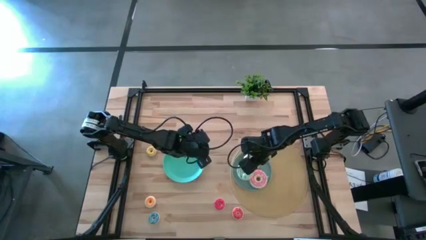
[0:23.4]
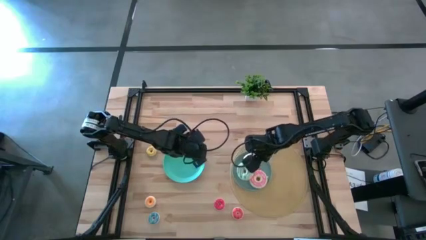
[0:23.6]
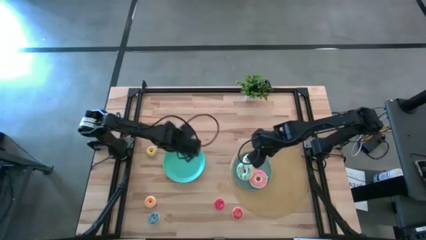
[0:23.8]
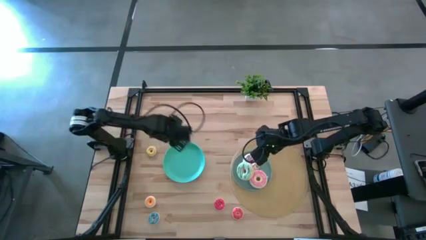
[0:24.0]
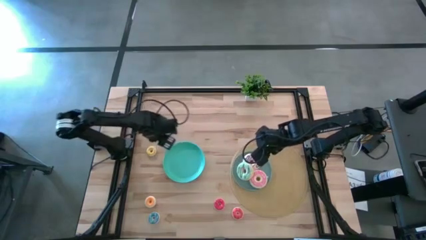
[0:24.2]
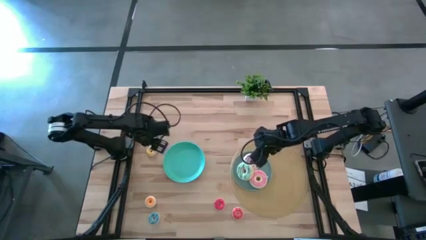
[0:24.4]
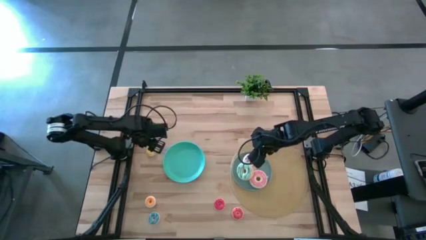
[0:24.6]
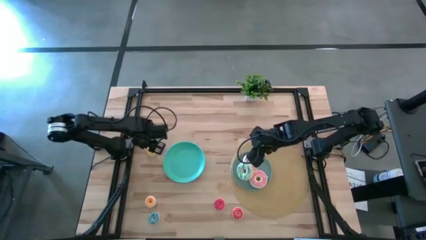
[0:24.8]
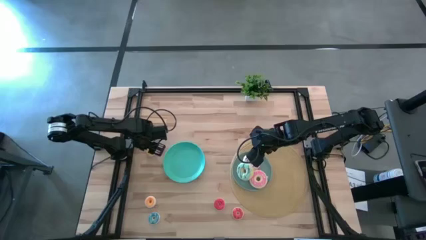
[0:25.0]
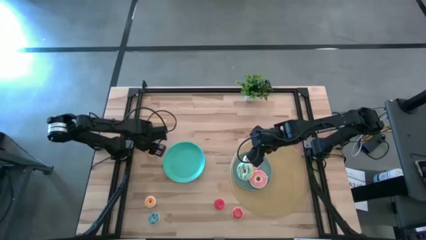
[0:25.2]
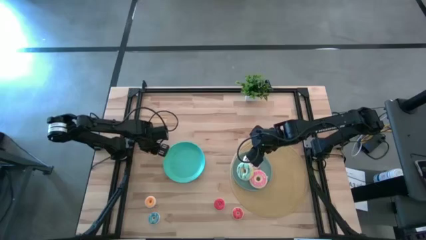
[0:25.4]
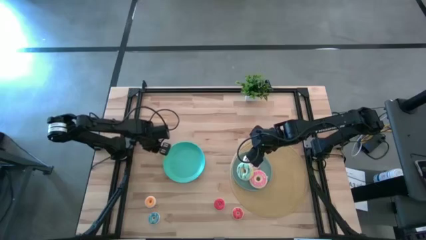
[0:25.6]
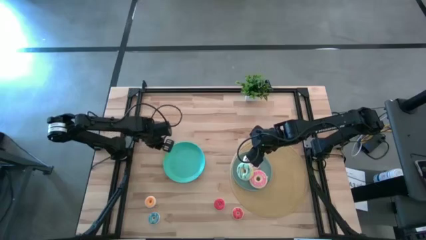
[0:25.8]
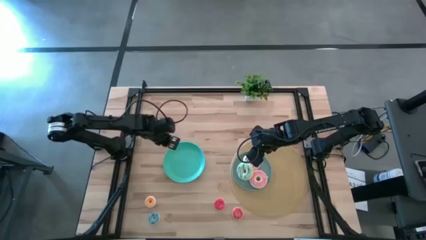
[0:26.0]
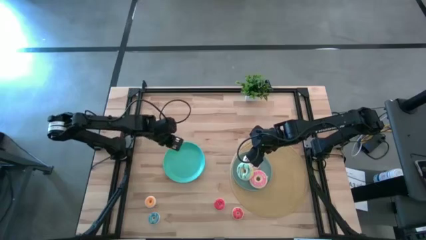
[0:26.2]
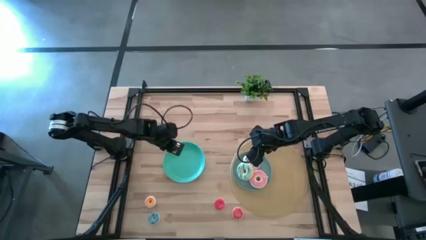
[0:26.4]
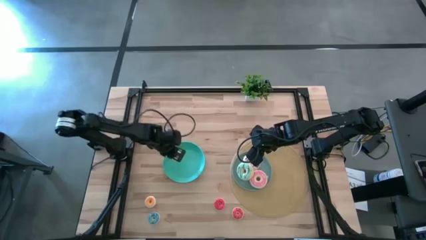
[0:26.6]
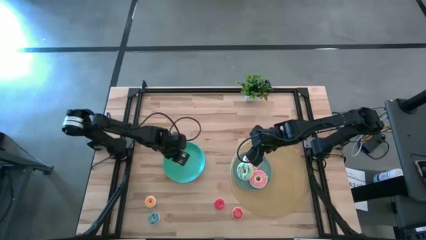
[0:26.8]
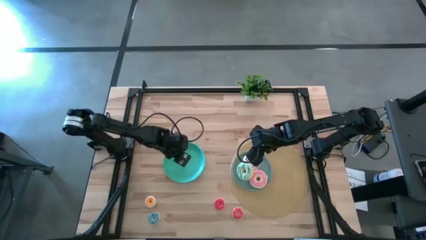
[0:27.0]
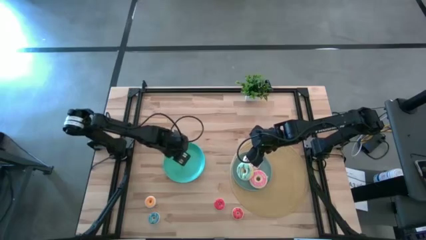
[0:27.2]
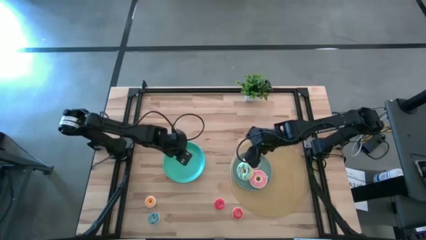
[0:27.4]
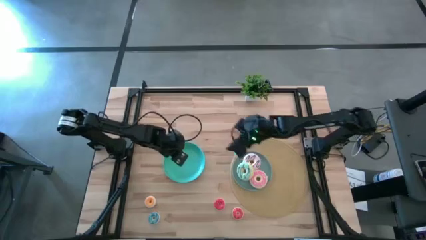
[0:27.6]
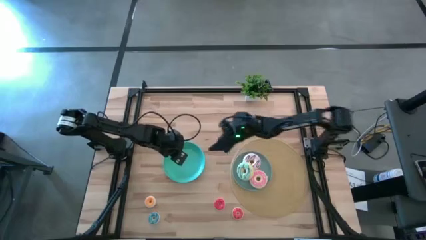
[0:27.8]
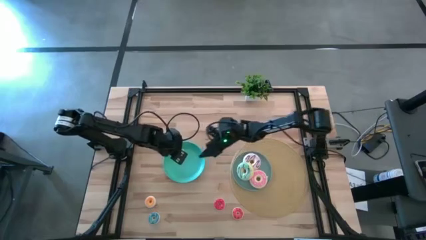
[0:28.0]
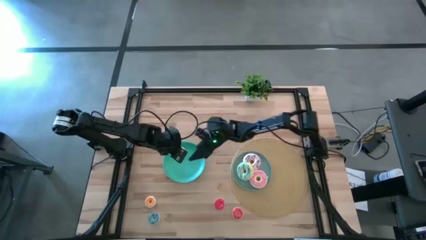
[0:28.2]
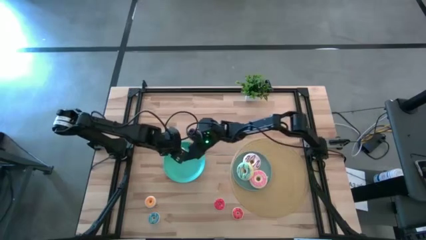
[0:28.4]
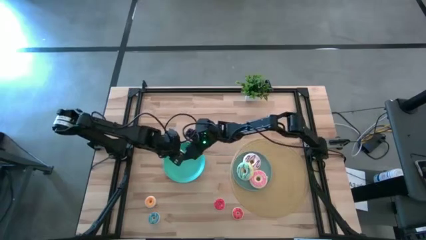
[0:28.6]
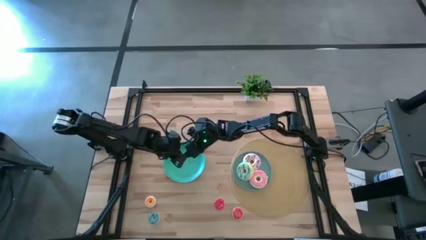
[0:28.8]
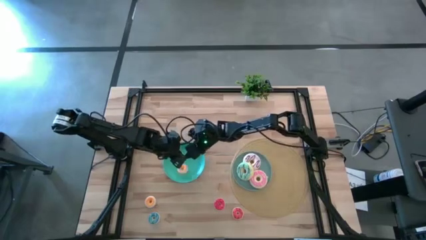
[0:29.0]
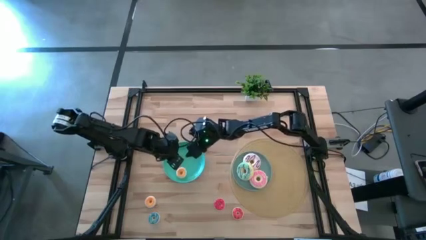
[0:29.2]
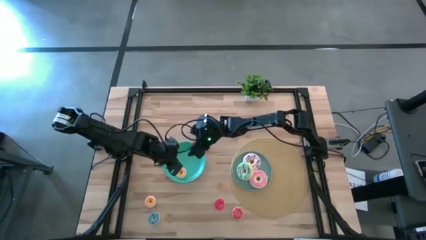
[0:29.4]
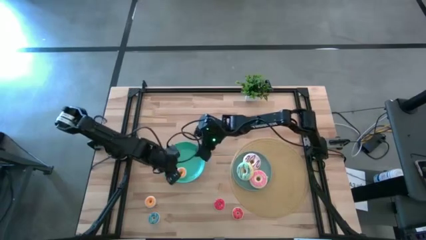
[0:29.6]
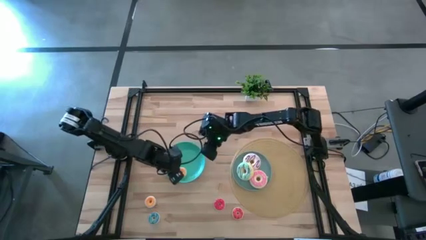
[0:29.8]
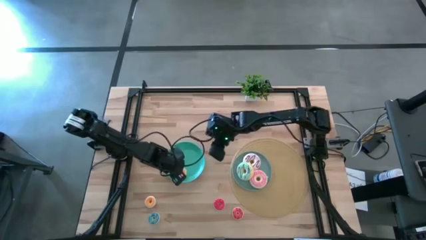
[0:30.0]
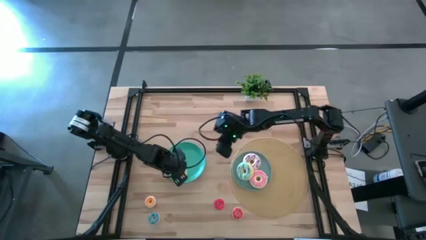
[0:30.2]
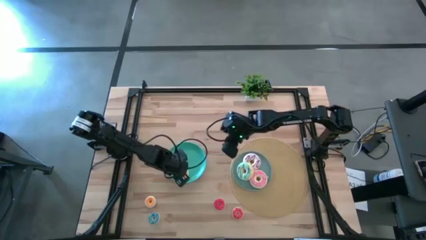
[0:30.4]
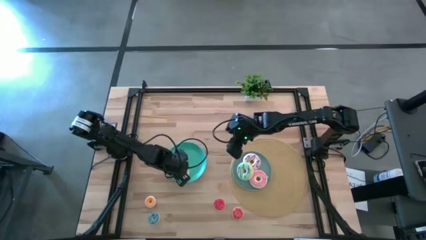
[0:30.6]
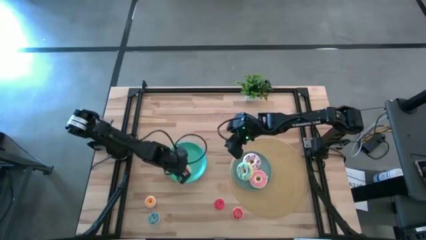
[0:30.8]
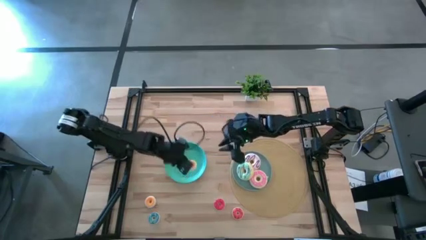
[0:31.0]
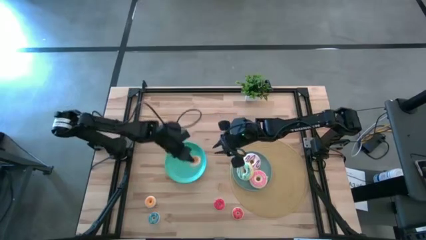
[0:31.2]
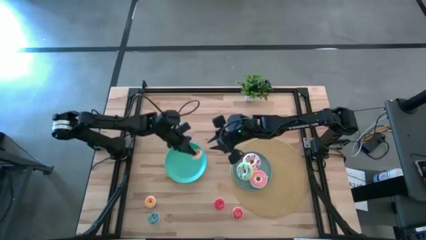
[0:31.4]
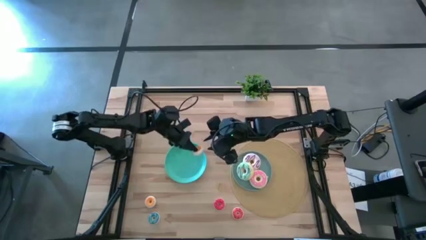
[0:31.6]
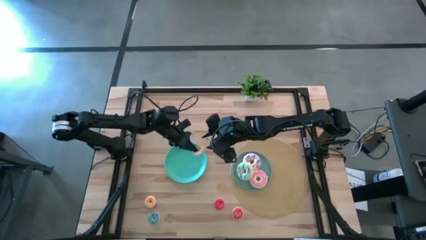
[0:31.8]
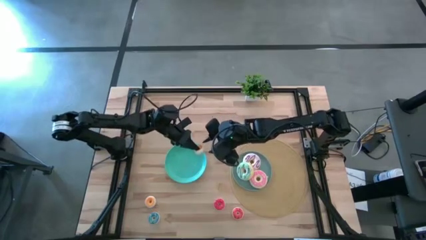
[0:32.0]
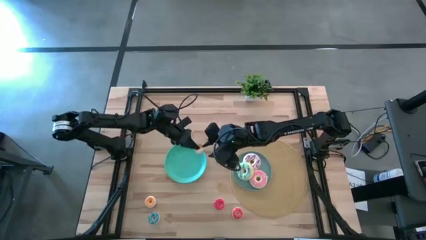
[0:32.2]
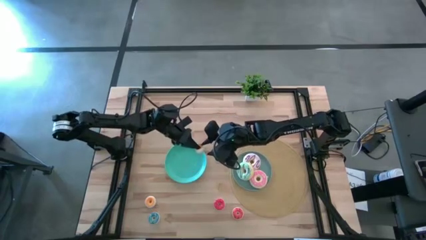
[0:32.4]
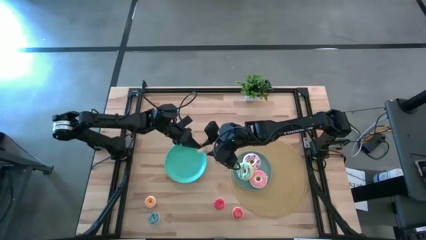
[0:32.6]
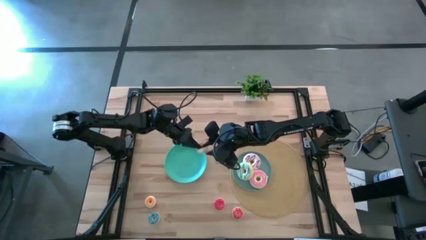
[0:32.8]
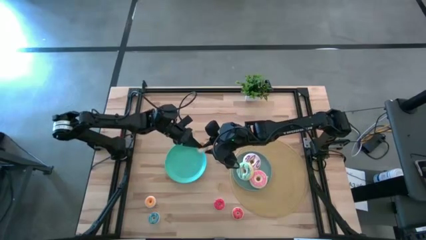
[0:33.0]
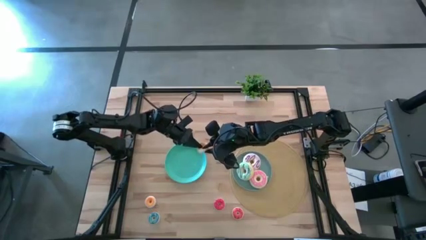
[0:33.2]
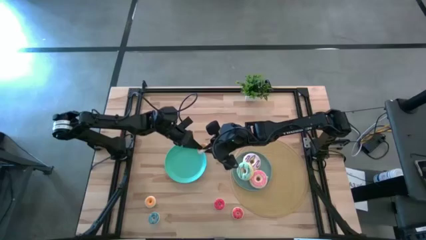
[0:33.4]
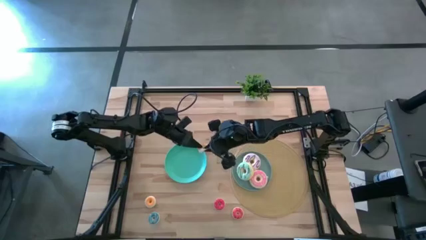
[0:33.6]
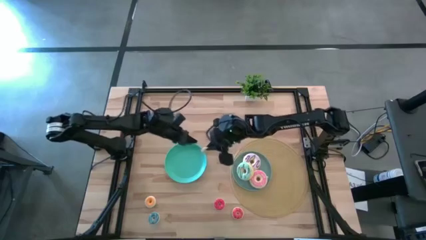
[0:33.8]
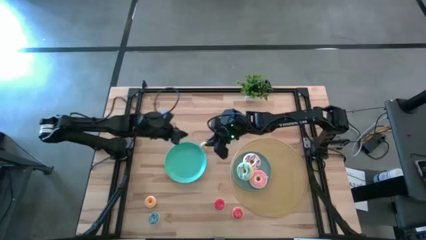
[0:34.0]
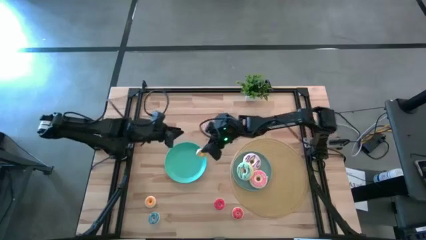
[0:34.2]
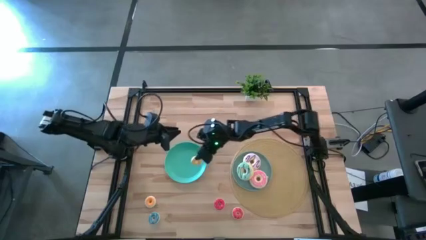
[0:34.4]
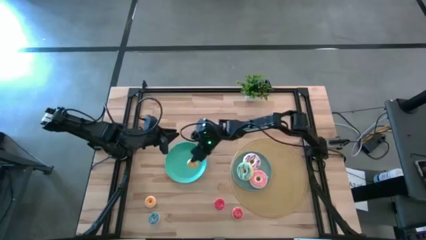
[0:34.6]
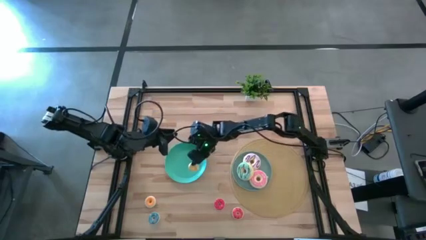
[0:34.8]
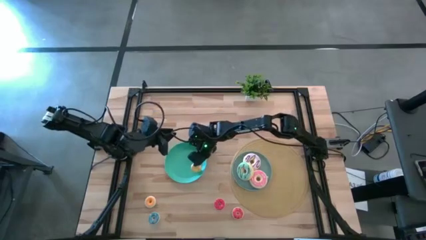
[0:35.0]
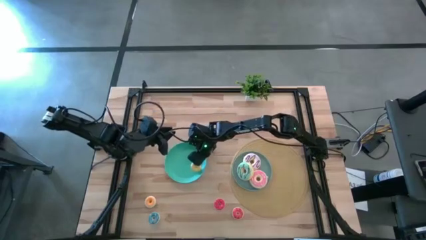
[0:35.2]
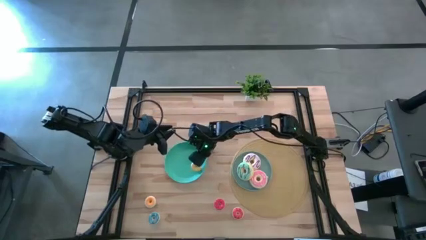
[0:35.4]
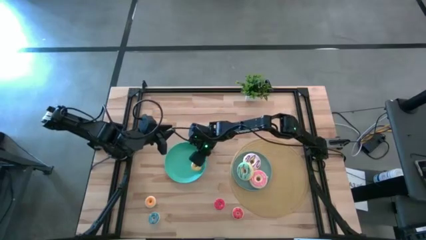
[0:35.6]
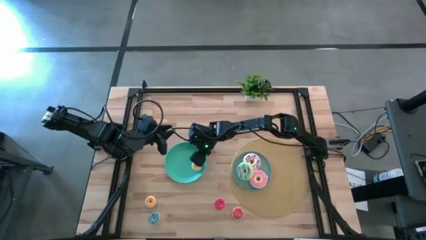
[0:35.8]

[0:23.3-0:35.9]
Task: Pick & Place donuts
Put the small yellow donut on the light blue plate

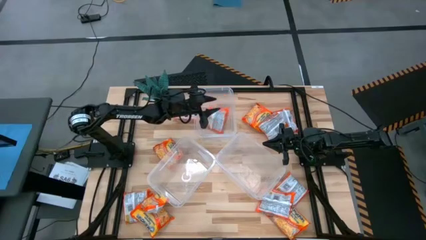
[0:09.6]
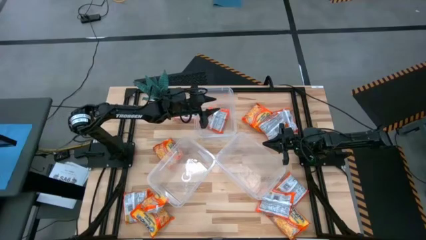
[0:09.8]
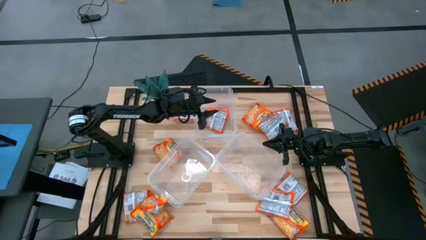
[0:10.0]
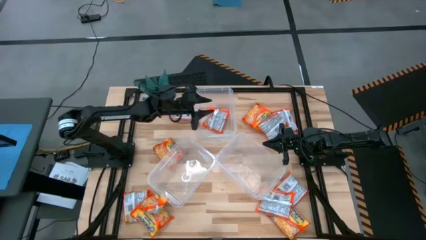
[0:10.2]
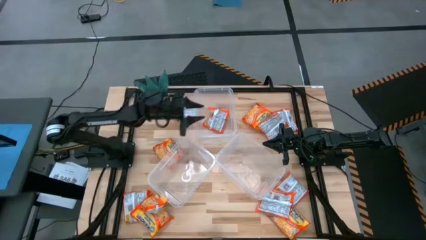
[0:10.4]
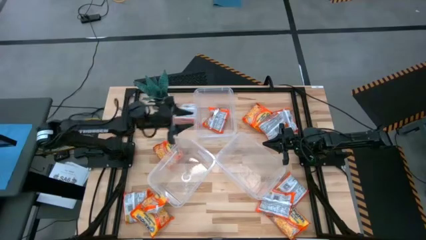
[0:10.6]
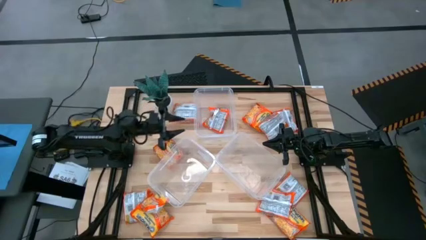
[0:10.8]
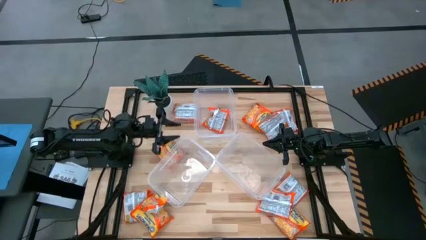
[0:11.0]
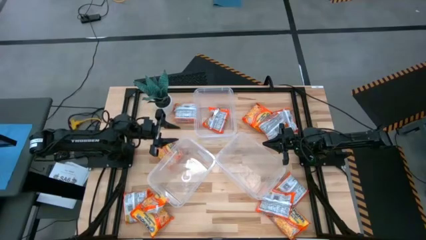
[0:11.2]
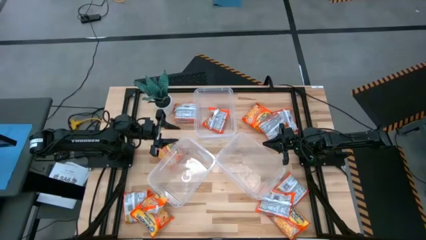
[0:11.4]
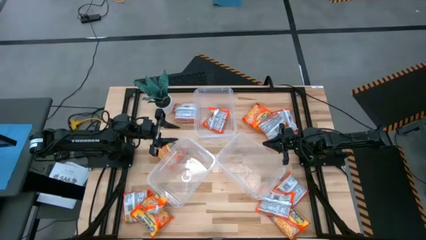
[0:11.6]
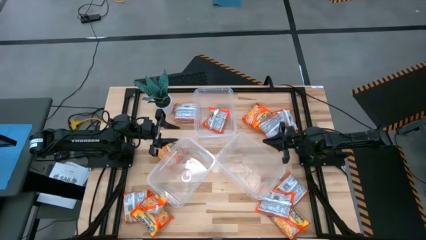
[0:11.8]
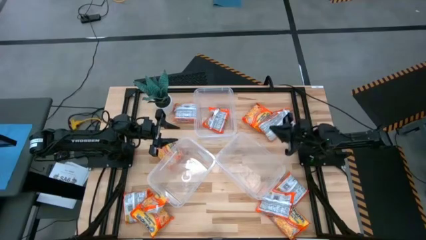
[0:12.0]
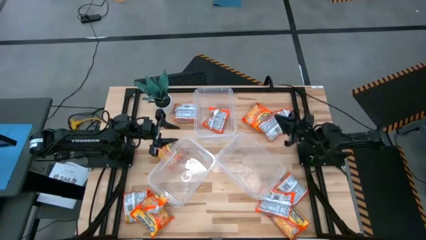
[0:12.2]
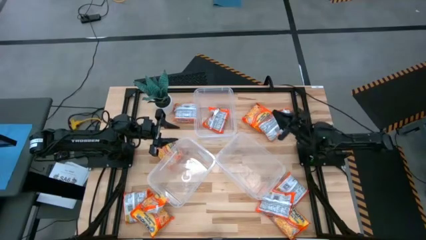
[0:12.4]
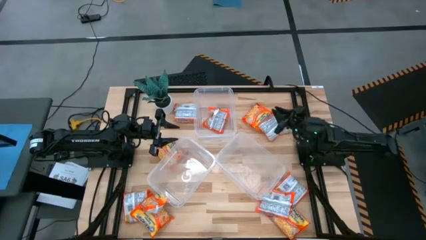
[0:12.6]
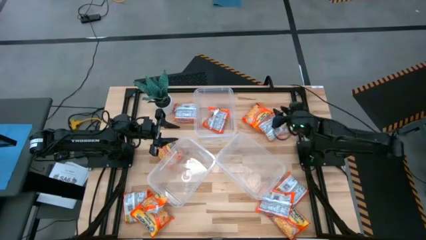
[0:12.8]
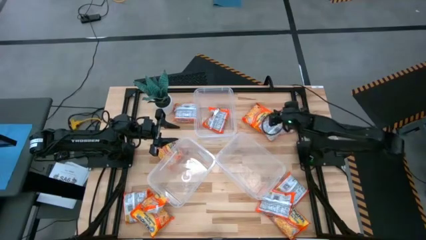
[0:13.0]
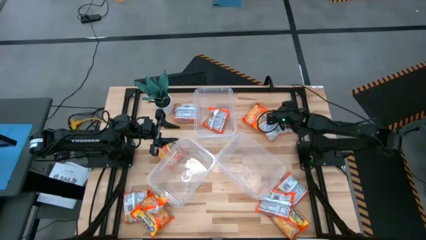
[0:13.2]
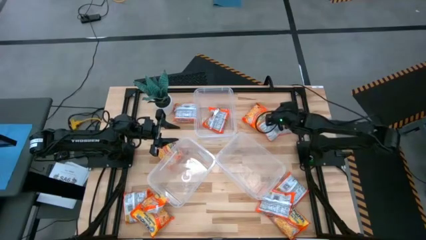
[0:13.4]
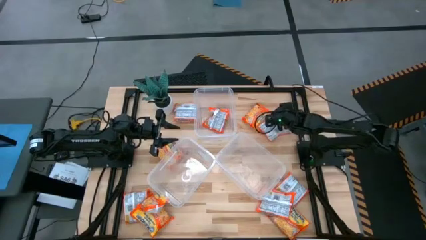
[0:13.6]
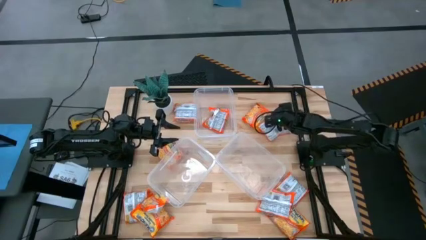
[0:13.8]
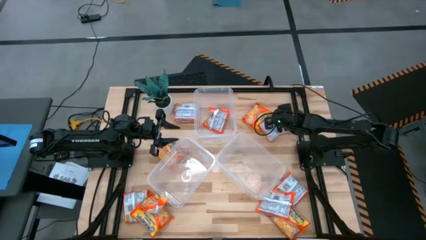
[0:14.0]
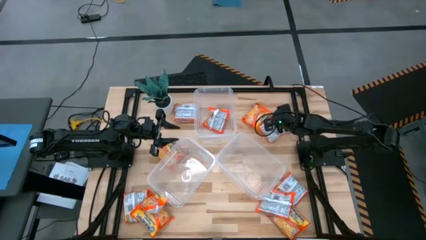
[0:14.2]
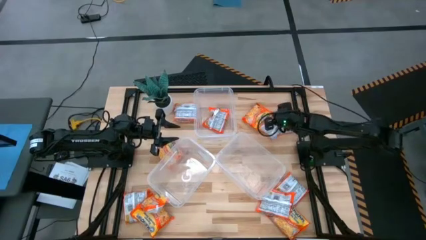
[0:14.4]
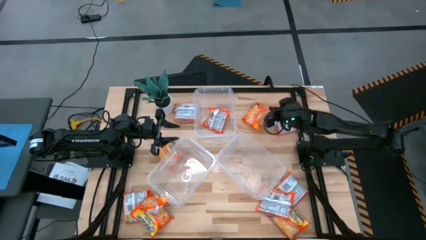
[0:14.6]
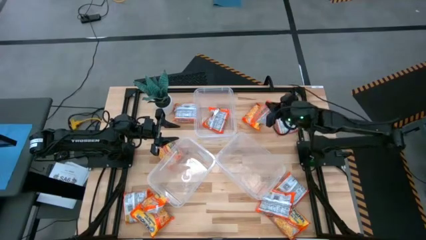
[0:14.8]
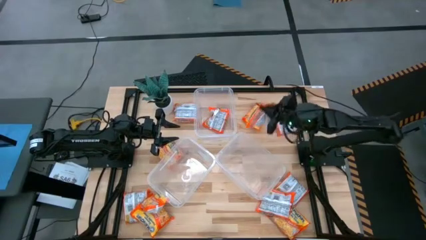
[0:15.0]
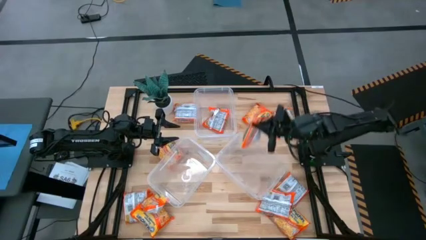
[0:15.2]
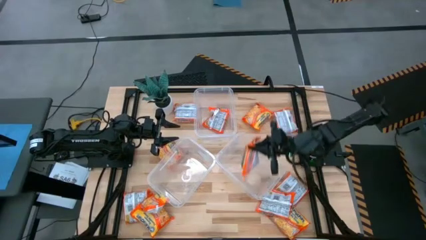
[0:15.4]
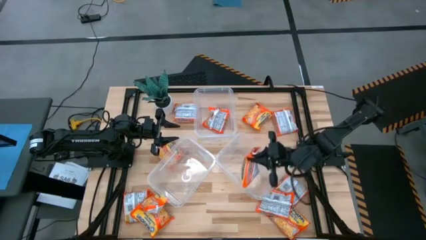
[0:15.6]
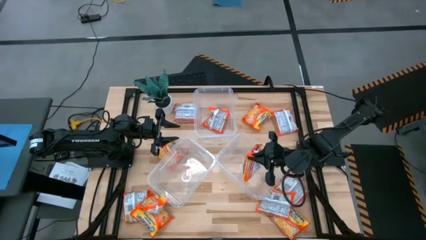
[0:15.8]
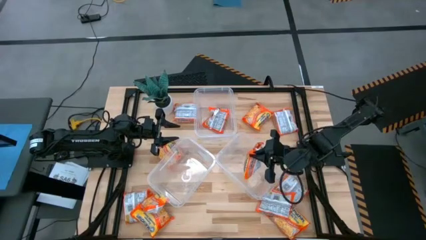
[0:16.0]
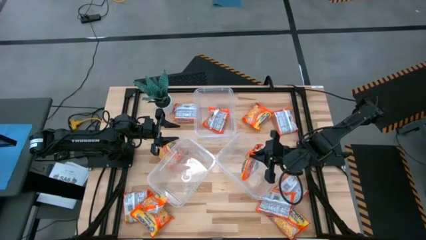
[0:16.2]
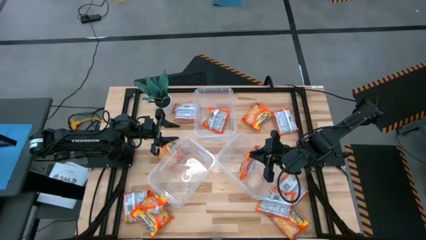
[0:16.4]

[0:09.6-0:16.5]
Task: Sort Maruchan noodles
Put the noodle pack into the bottom right transparent bin
